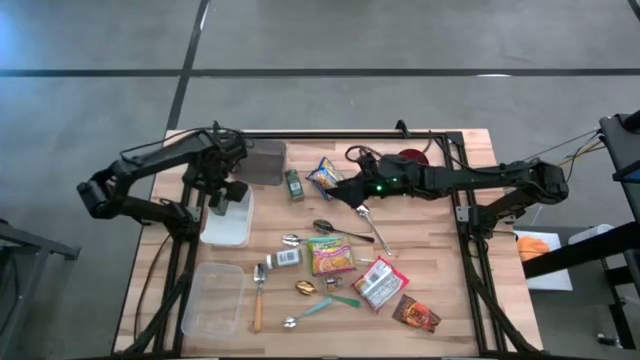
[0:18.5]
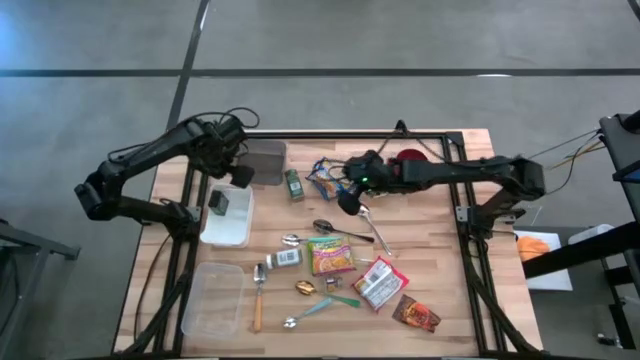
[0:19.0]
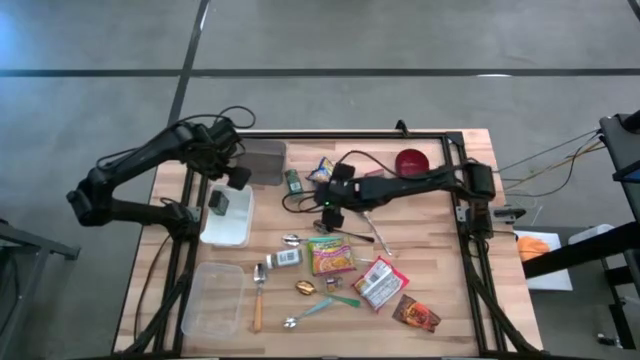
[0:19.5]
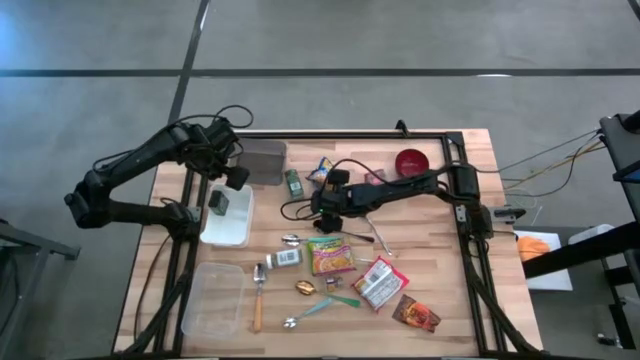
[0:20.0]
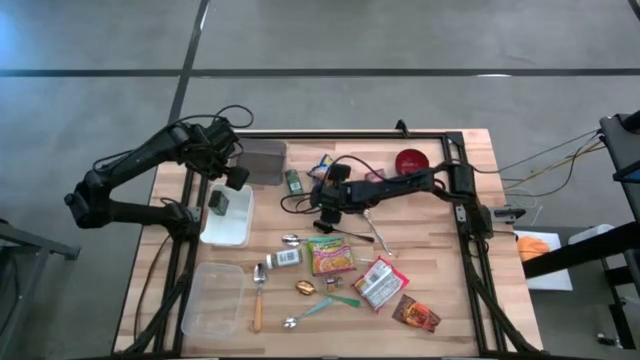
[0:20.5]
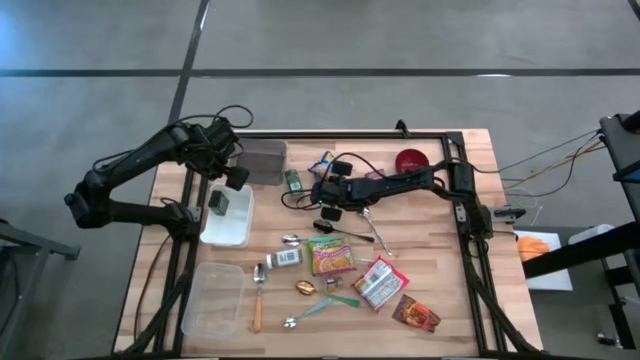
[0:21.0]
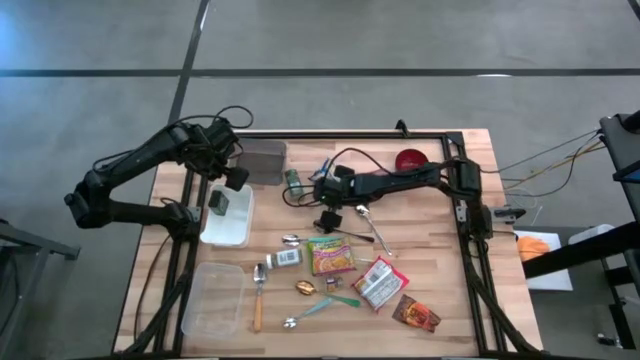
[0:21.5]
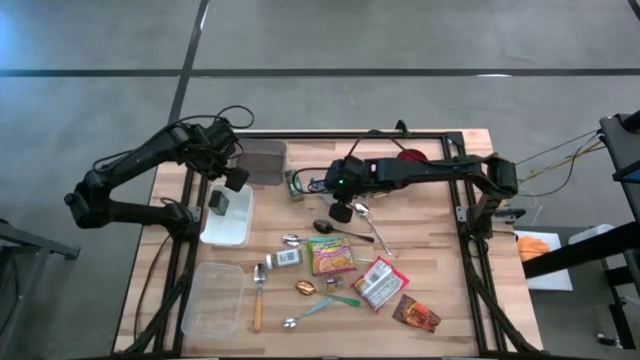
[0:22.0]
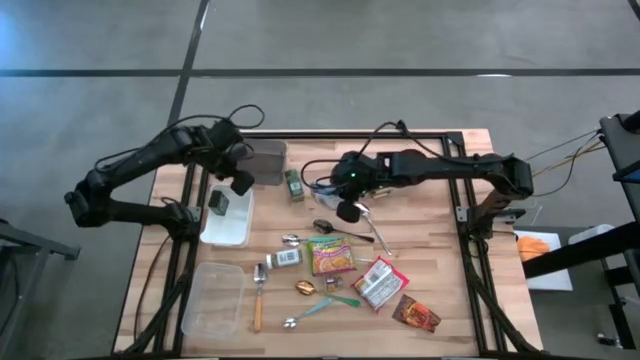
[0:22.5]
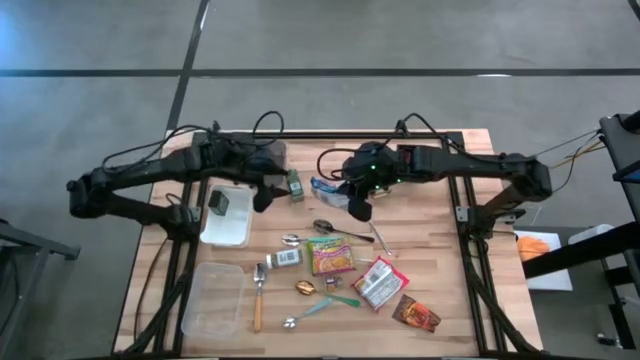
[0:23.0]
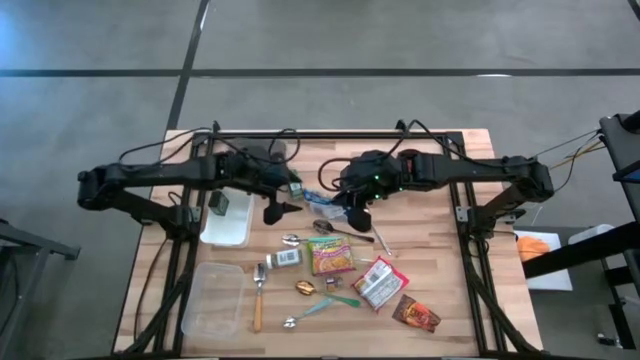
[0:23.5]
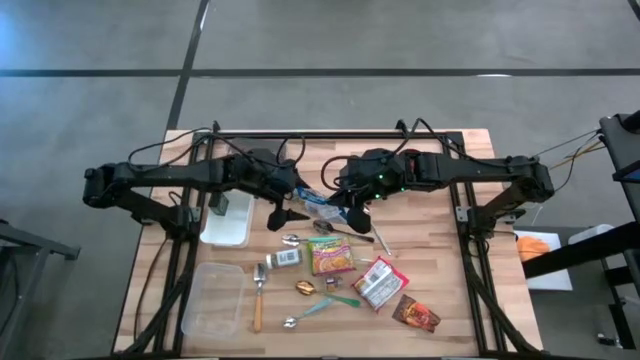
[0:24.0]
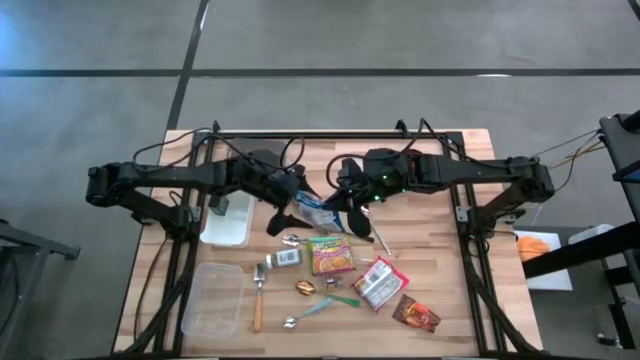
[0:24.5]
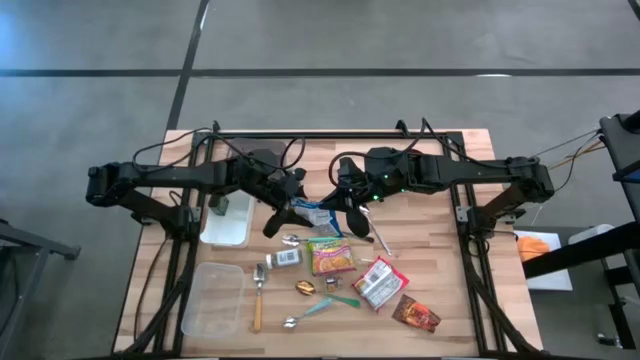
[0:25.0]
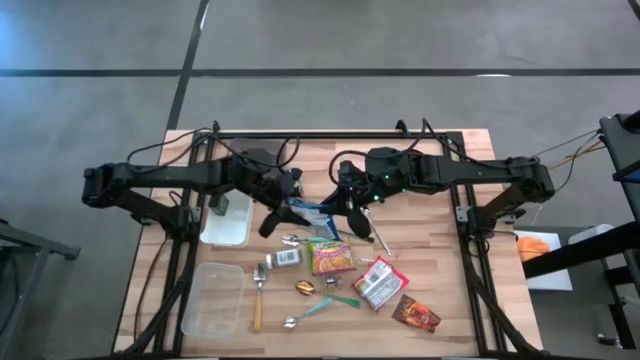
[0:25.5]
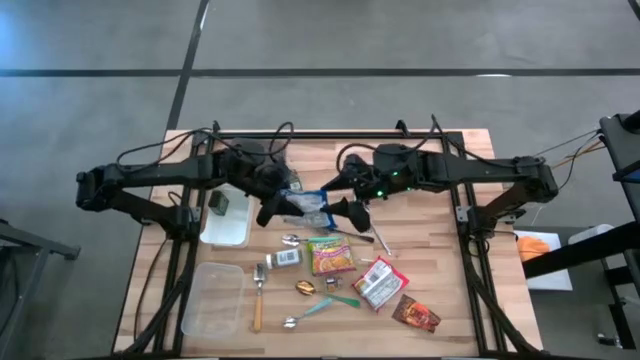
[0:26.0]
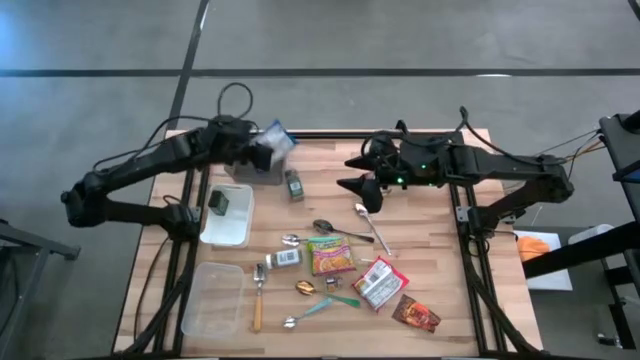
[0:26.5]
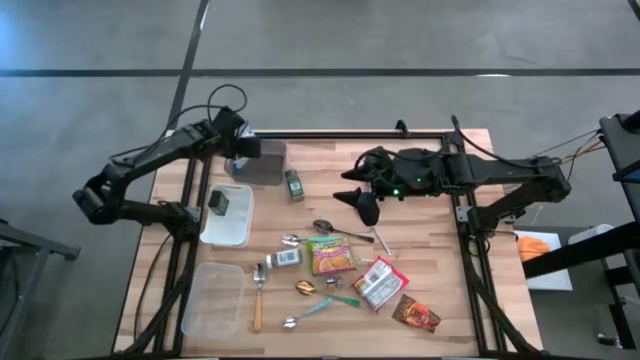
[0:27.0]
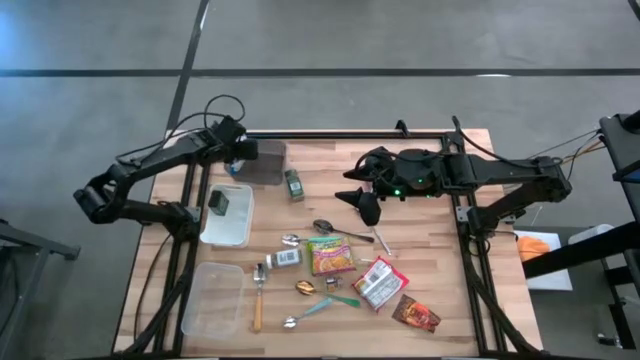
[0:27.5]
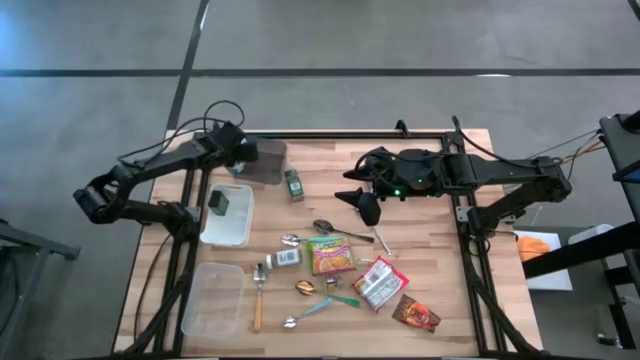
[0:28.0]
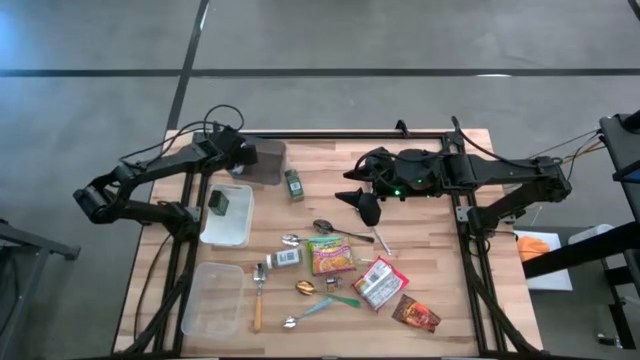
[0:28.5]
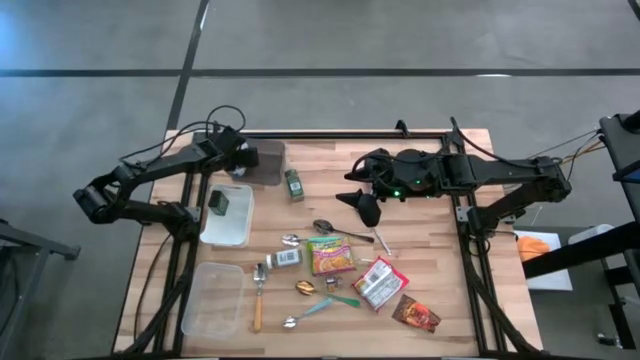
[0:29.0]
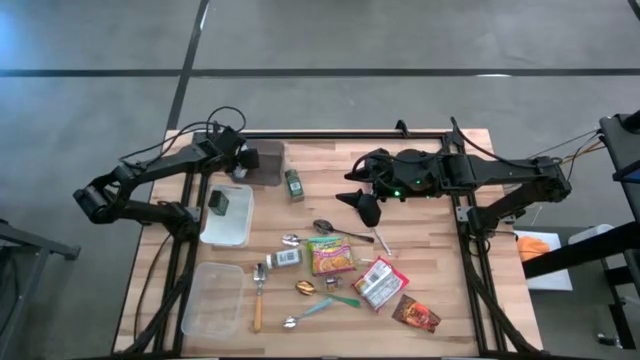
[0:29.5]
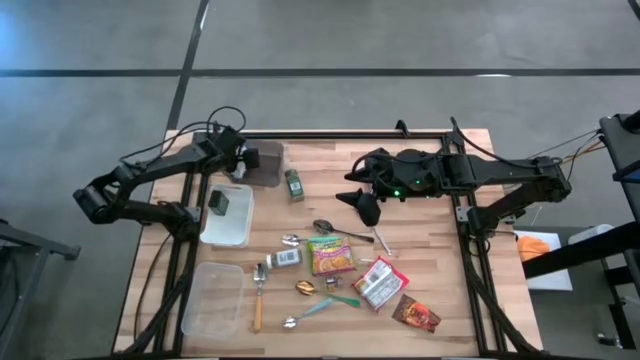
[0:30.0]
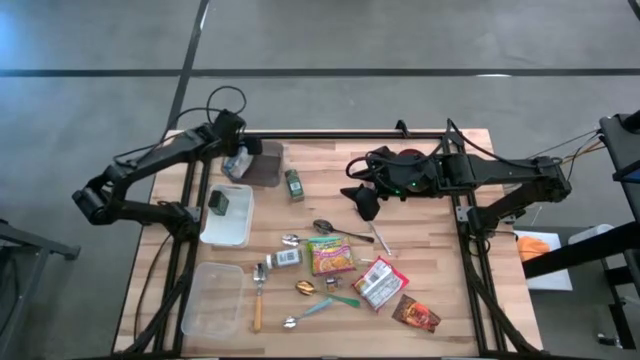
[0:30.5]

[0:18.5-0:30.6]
Put the blue noodle pack into the black bin

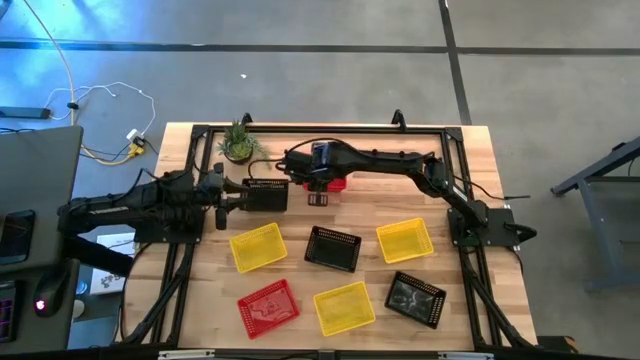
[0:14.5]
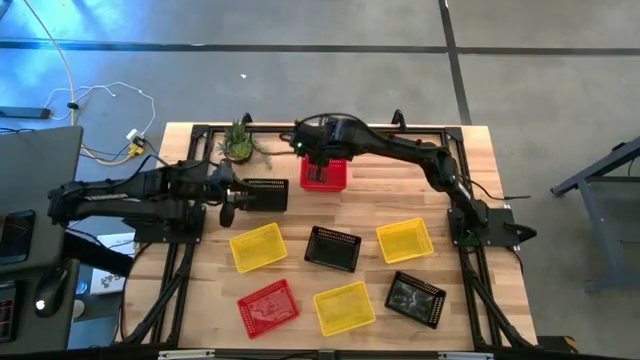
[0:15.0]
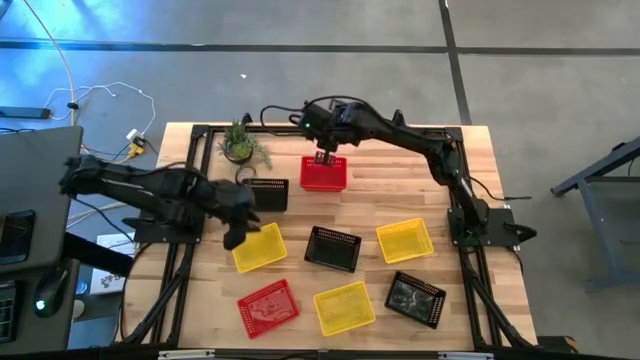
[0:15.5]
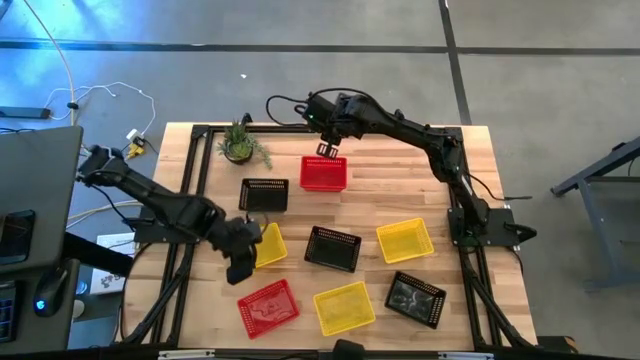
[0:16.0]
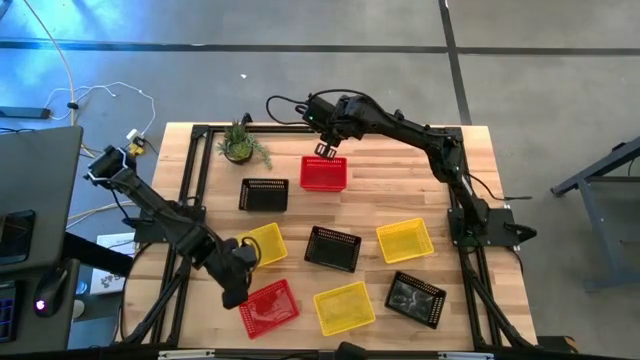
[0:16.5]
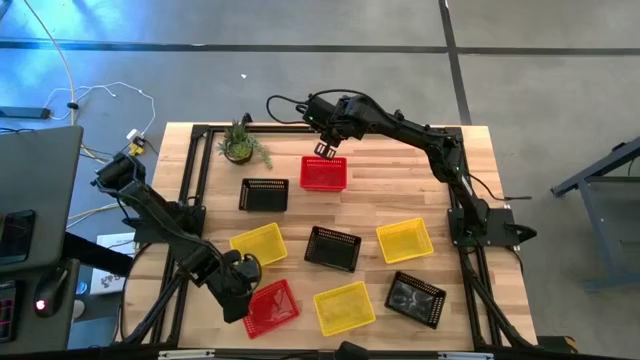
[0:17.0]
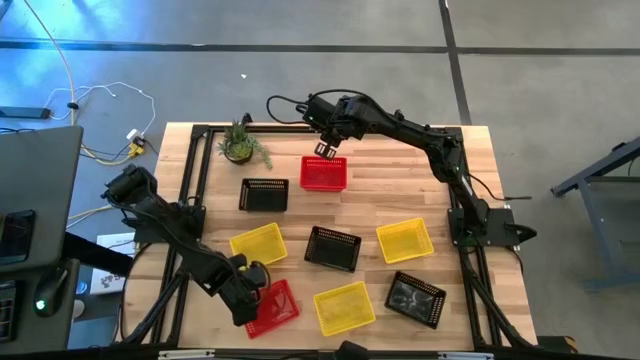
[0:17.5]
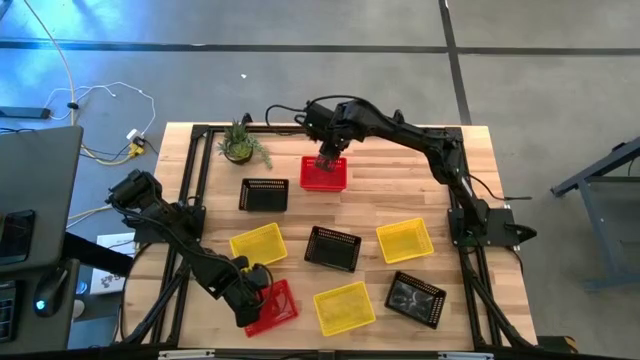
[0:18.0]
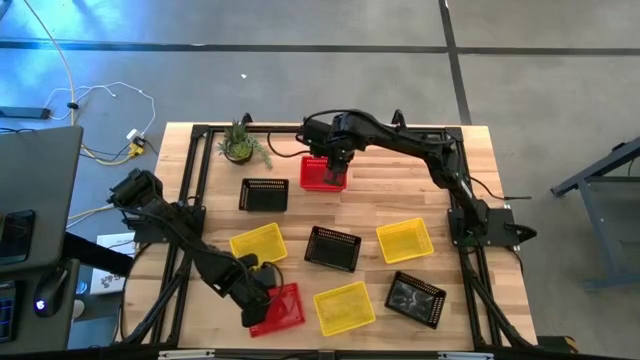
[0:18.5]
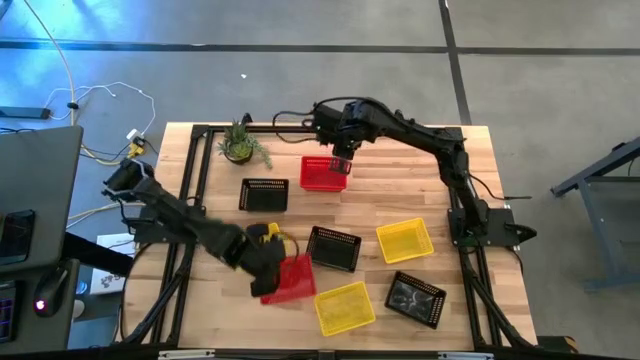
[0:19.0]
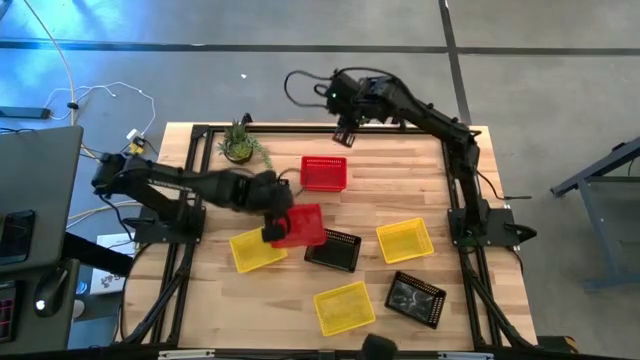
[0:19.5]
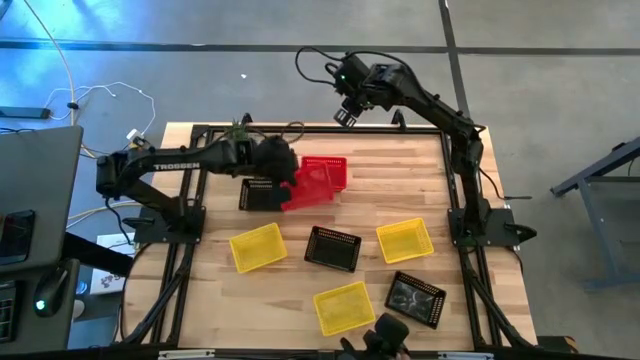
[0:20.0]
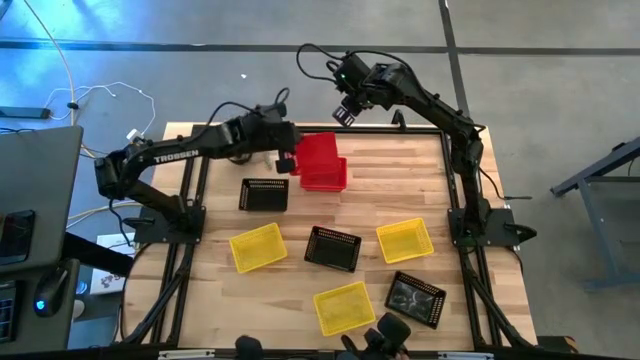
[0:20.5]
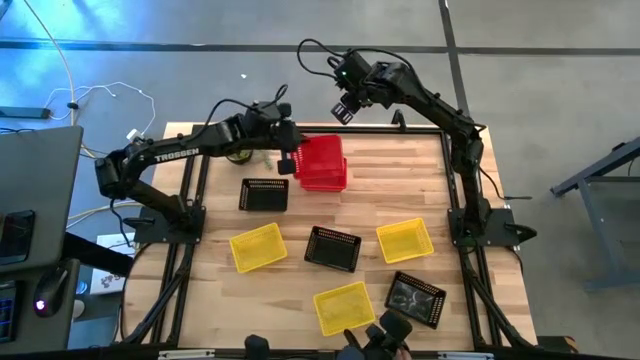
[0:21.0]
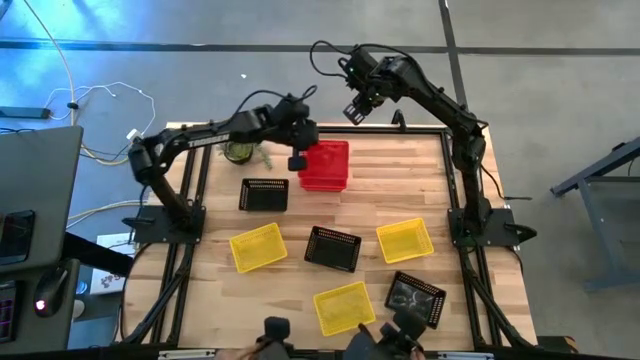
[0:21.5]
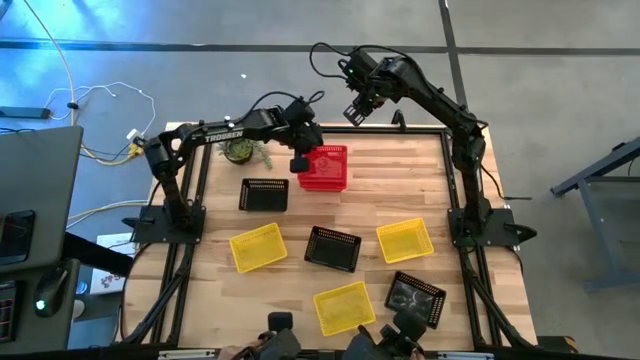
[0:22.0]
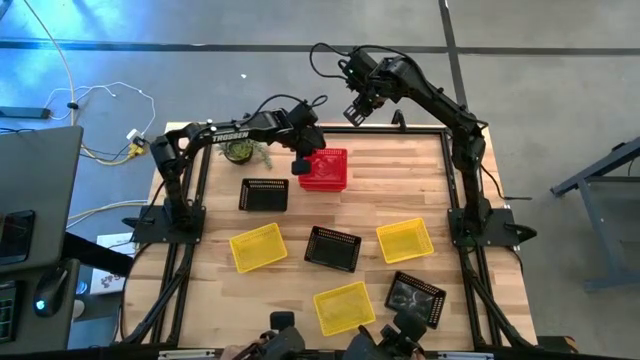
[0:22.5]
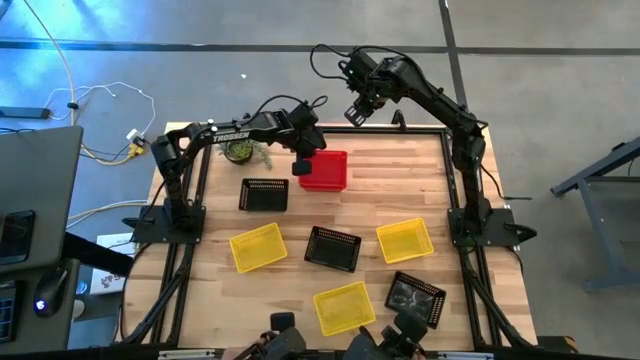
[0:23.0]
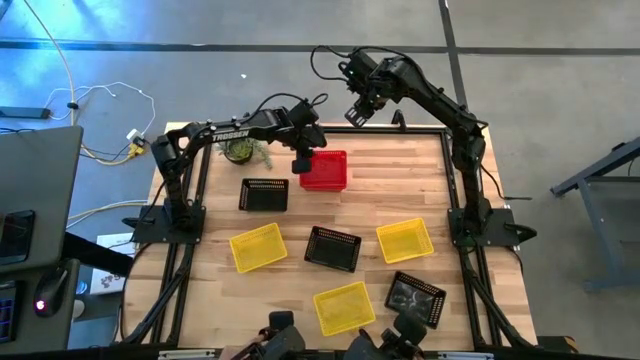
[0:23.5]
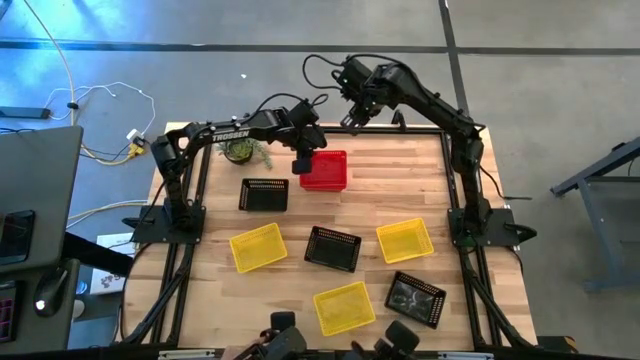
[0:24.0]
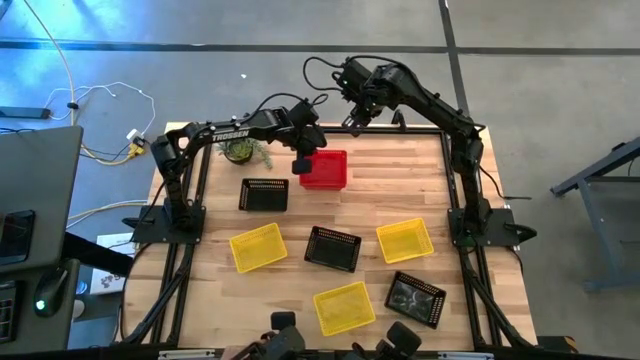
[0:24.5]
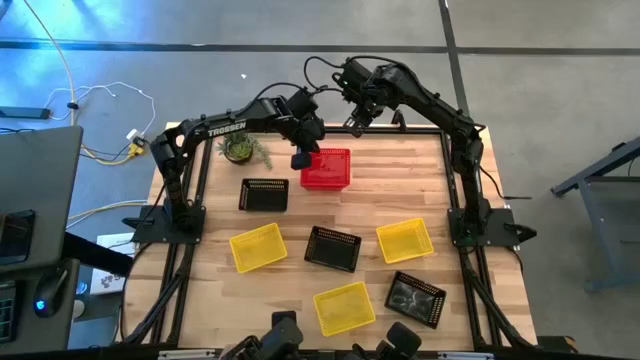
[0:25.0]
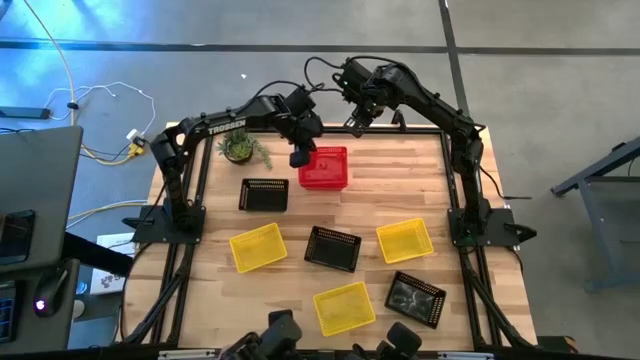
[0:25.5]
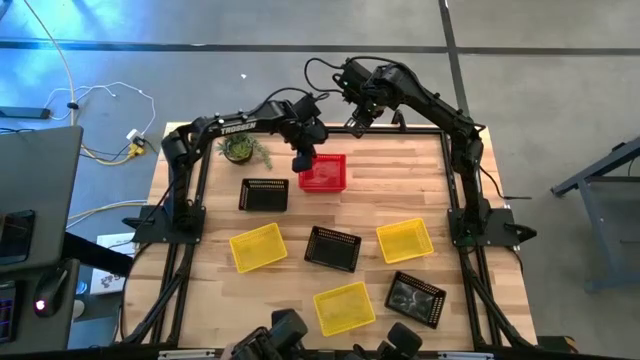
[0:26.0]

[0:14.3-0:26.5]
Stack the red basket on top of the other red baskets
